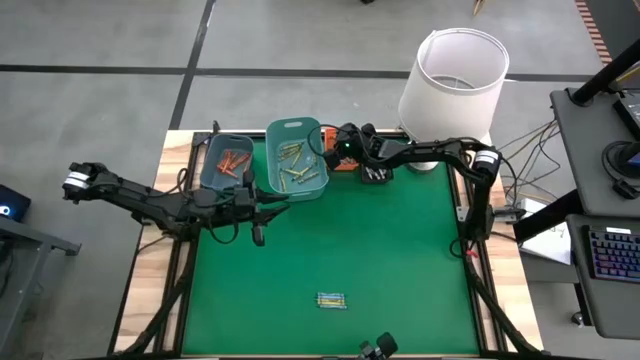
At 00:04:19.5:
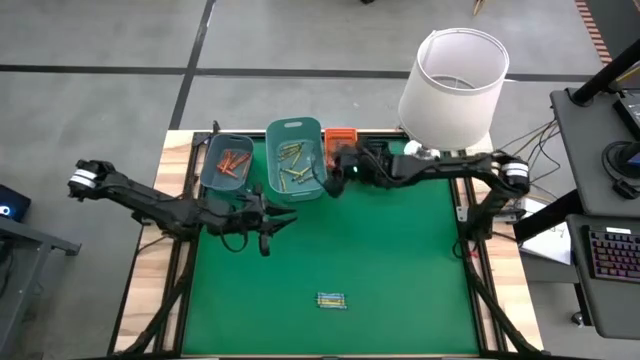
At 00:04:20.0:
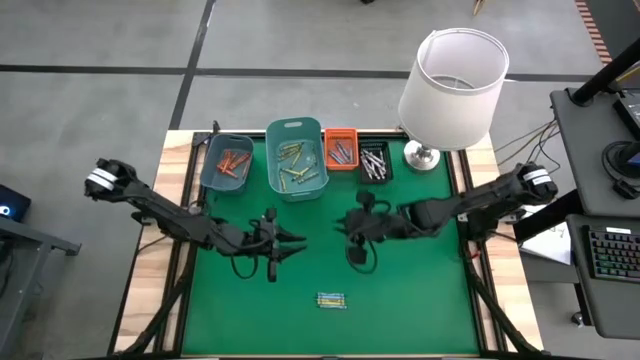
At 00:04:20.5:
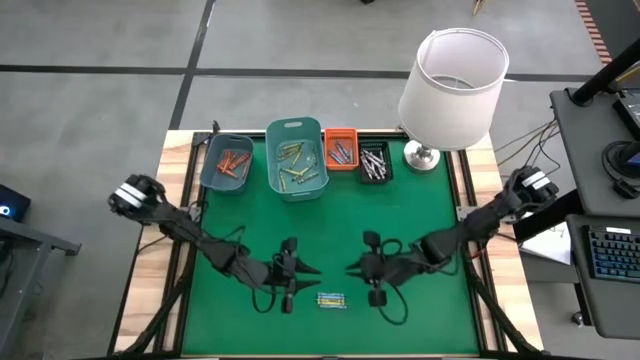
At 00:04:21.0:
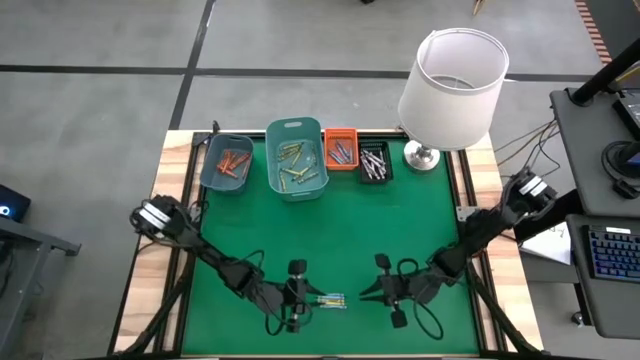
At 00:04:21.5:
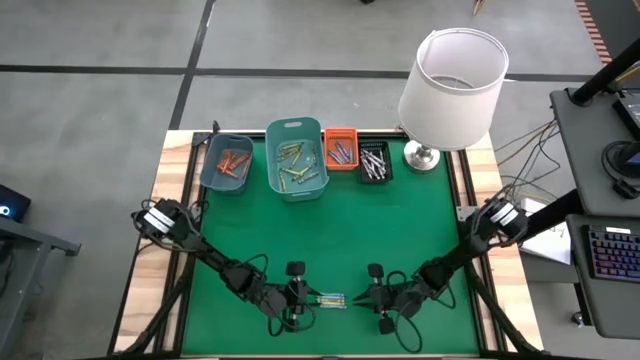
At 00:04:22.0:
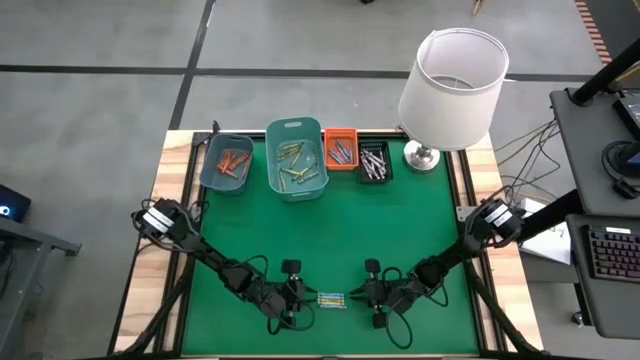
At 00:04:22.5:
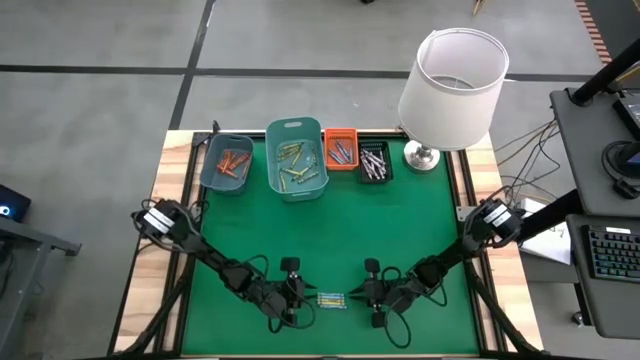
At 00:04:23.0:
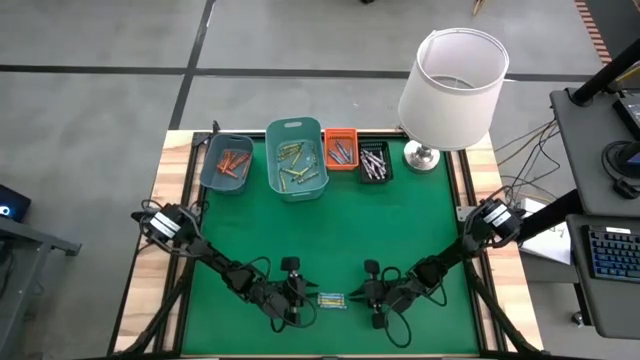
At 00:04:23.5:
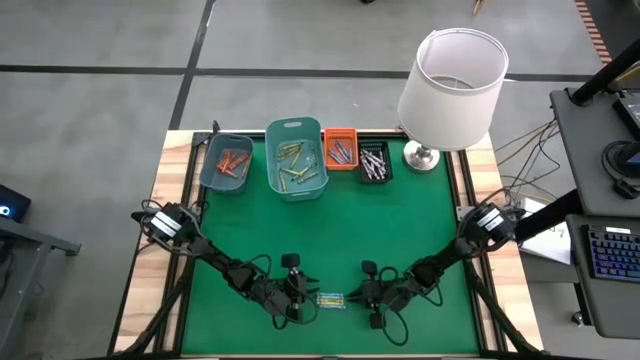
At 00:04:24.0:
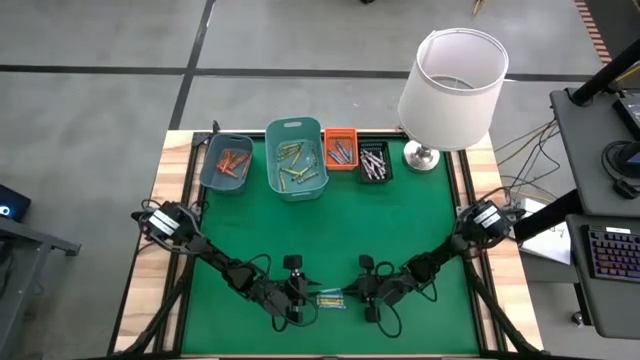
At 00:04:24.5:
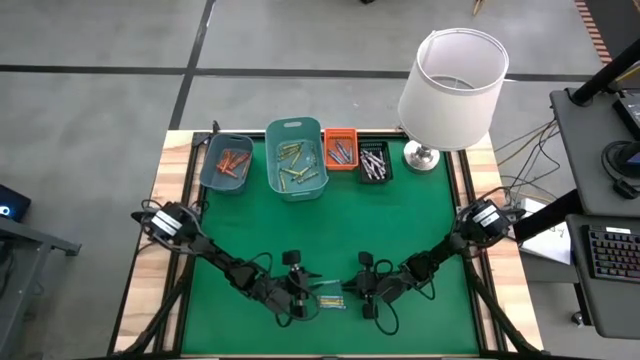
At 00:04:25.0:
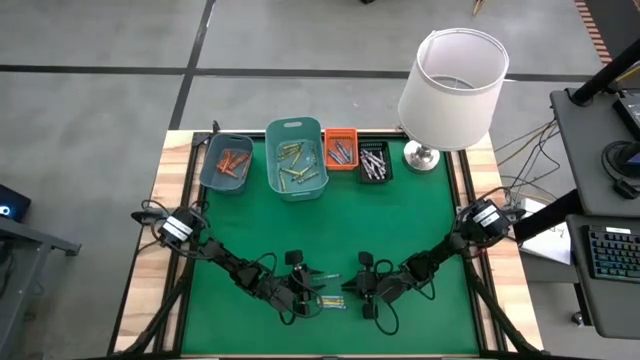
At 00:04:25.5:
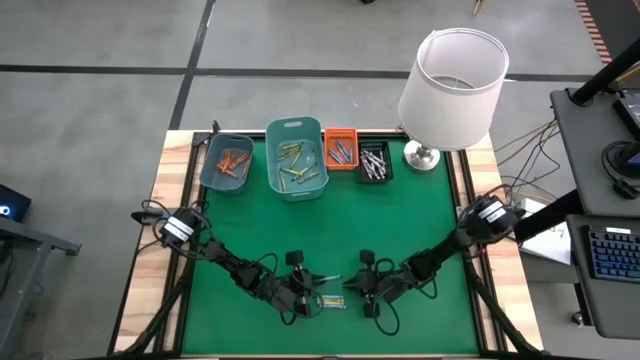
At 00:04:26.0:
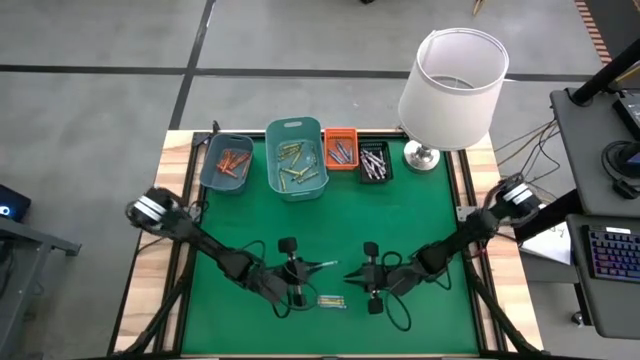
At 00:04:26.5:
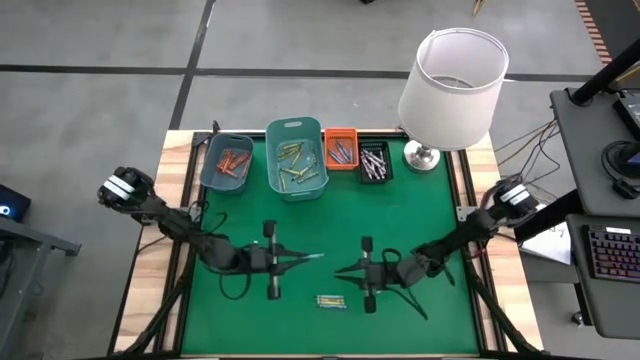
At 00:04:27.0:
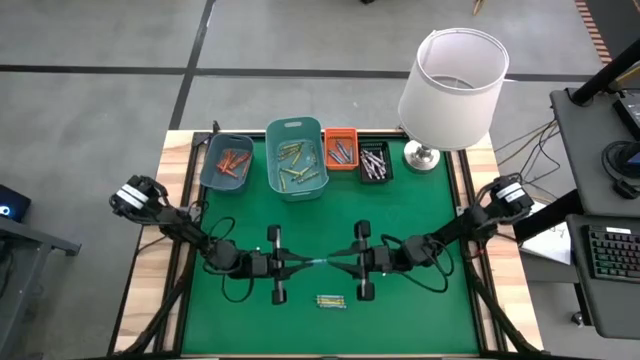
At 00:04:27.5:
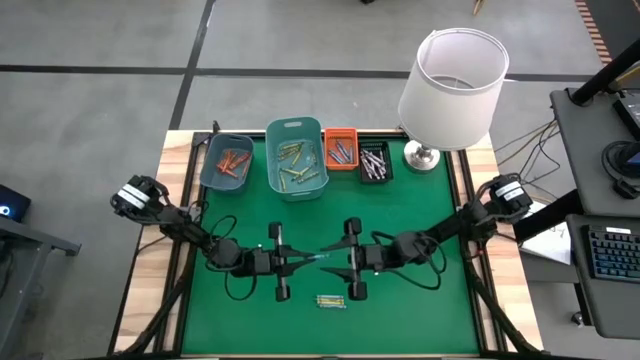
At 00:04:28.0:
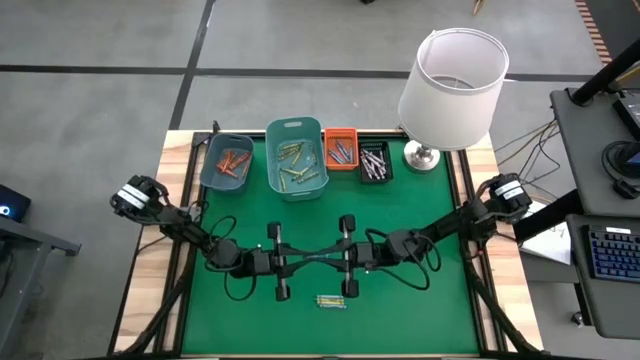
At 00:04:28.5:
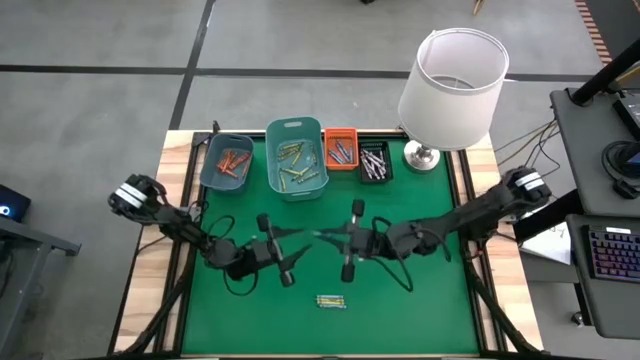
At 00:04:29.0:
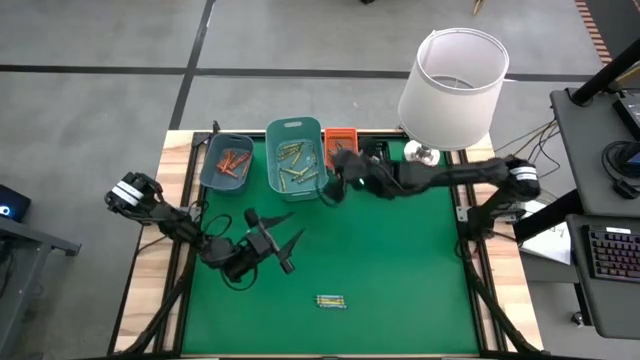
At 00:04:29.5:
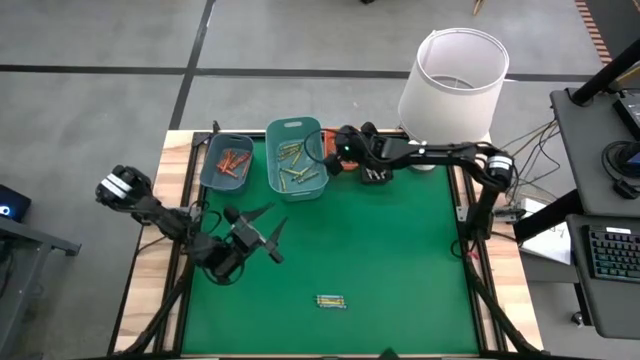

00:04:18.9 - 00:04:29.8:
Task: Sort crayons
Put the blue crayon into the orange bin

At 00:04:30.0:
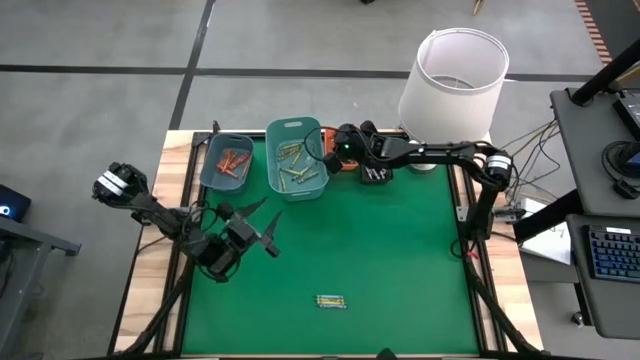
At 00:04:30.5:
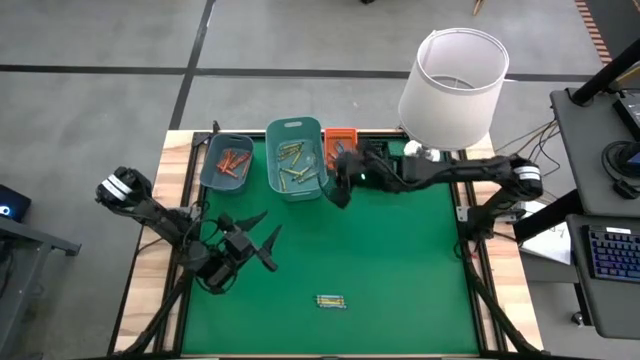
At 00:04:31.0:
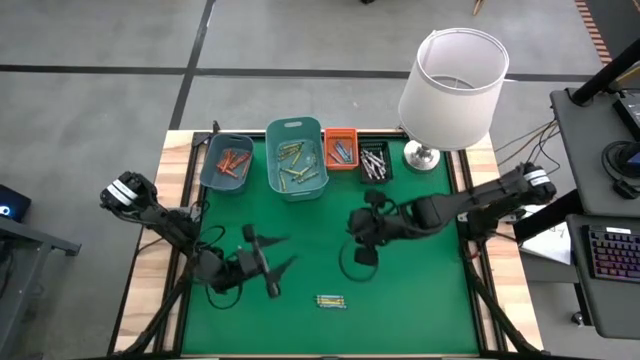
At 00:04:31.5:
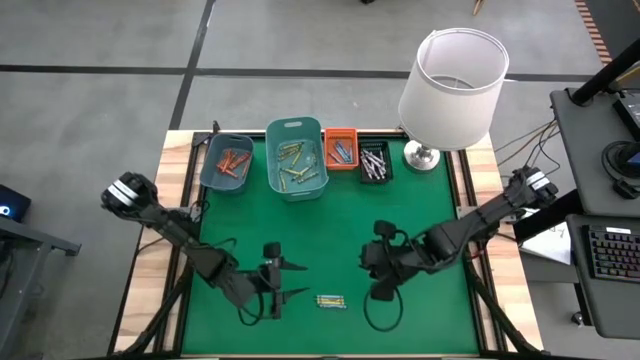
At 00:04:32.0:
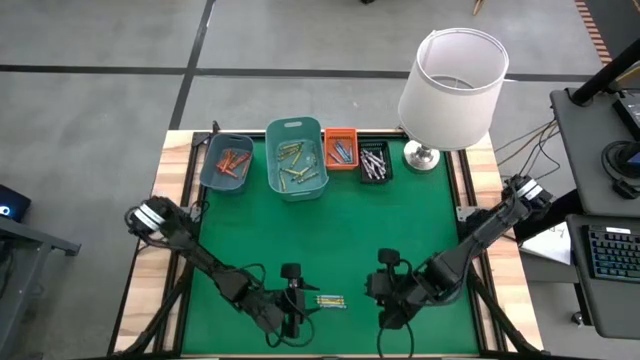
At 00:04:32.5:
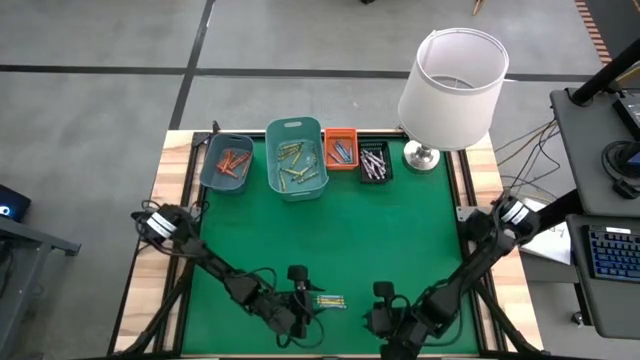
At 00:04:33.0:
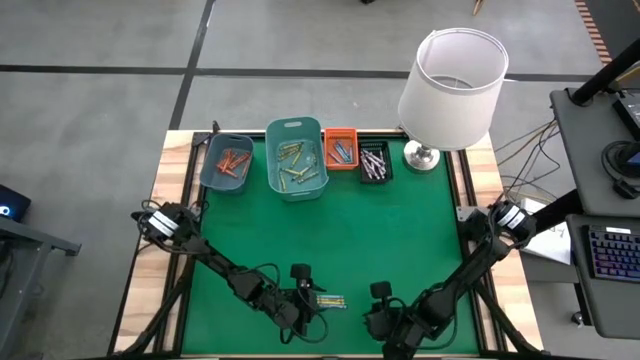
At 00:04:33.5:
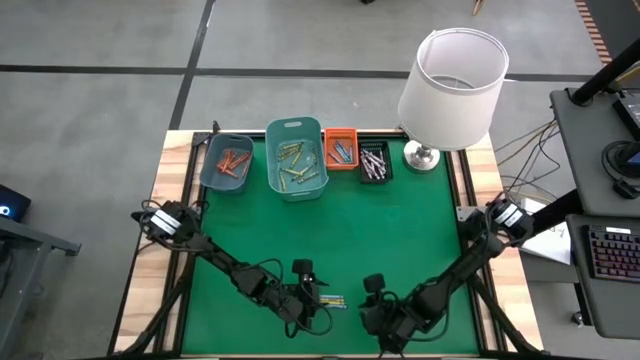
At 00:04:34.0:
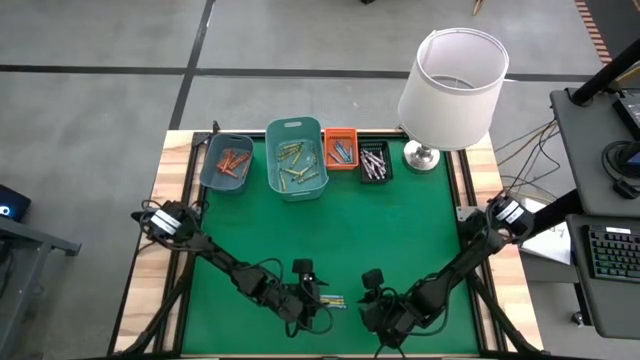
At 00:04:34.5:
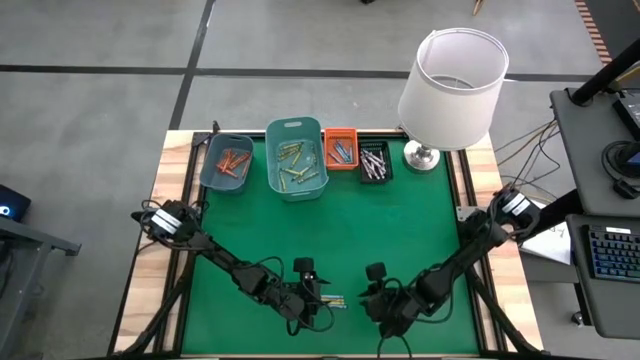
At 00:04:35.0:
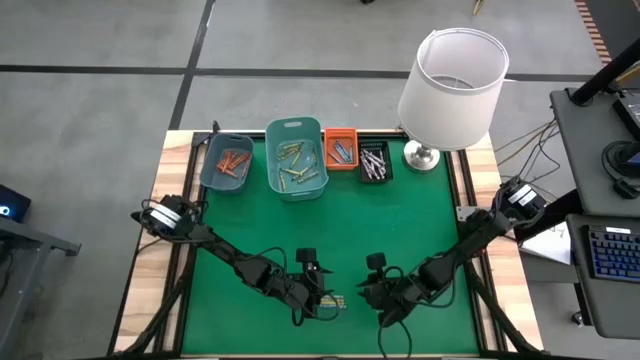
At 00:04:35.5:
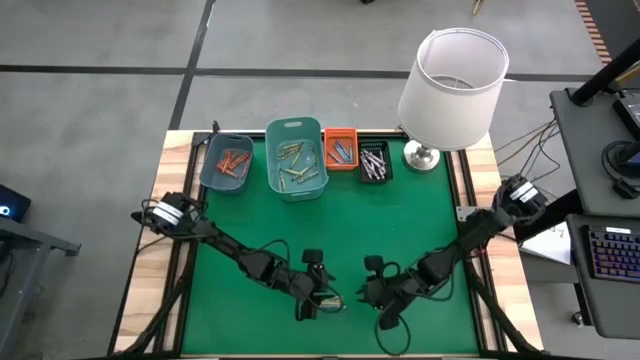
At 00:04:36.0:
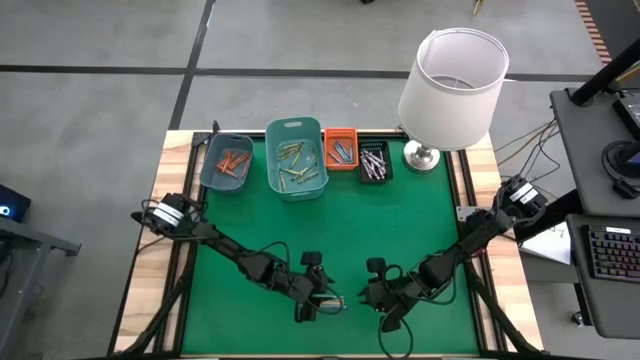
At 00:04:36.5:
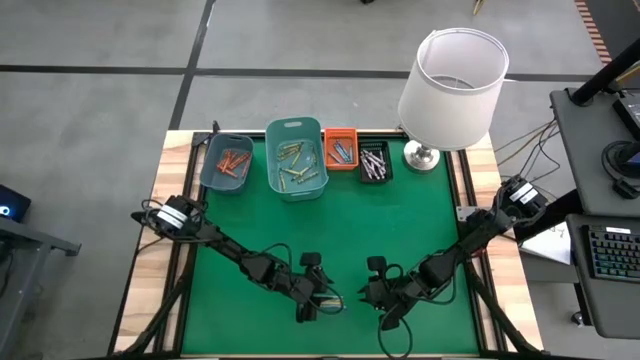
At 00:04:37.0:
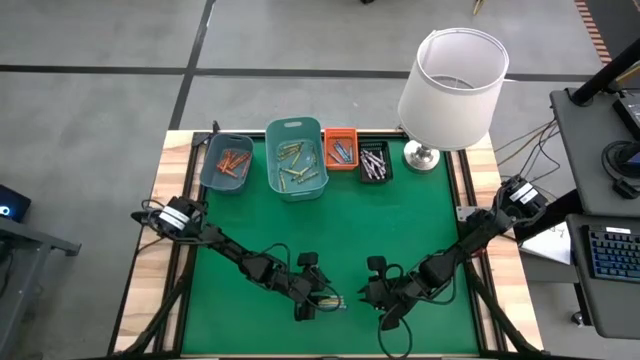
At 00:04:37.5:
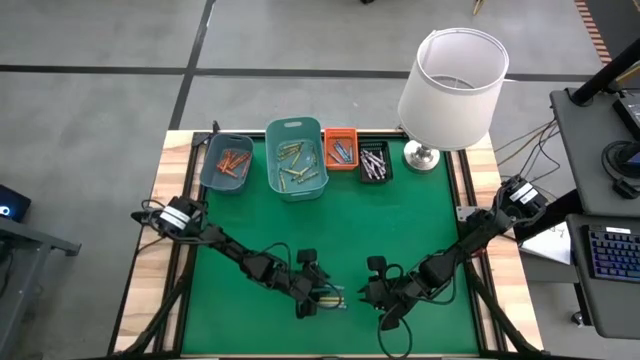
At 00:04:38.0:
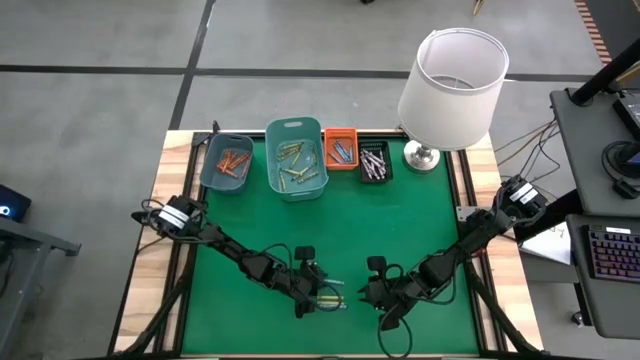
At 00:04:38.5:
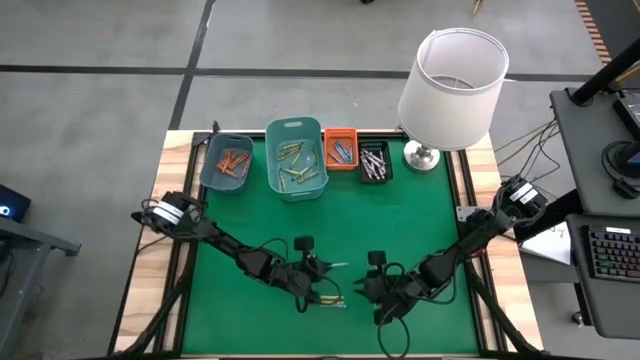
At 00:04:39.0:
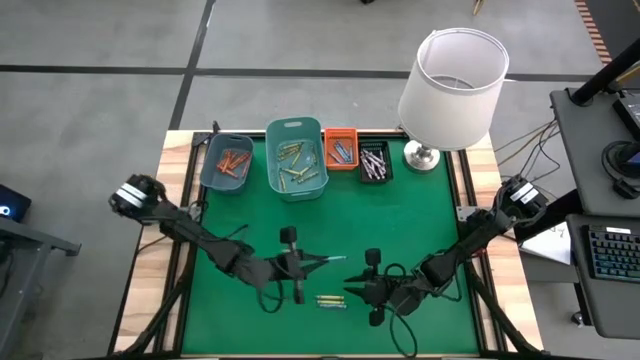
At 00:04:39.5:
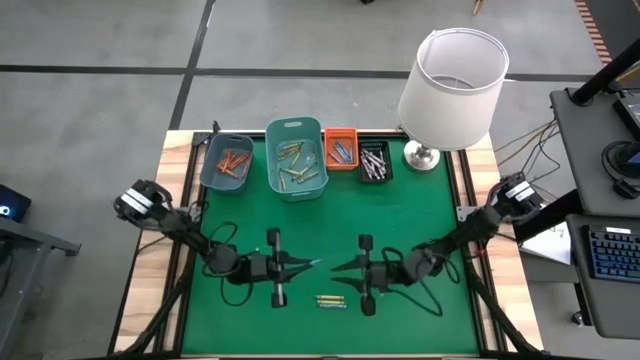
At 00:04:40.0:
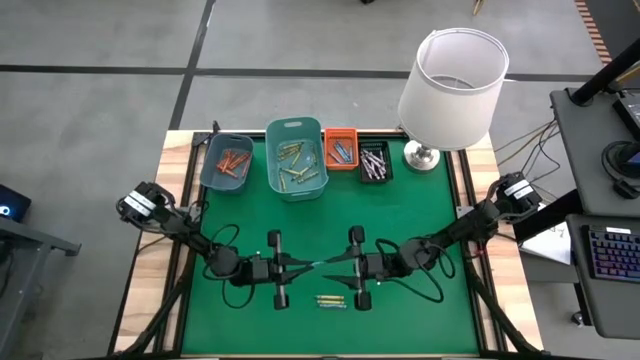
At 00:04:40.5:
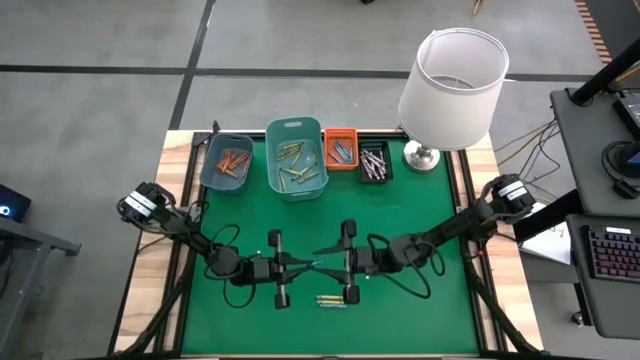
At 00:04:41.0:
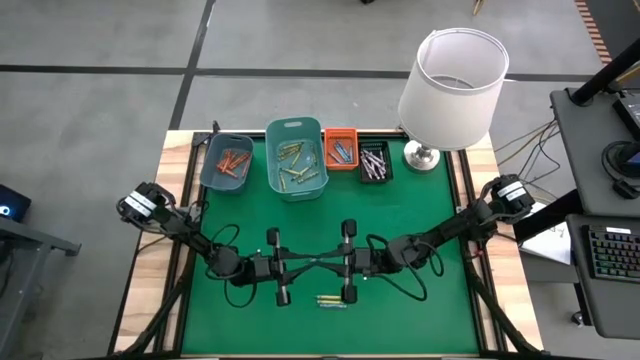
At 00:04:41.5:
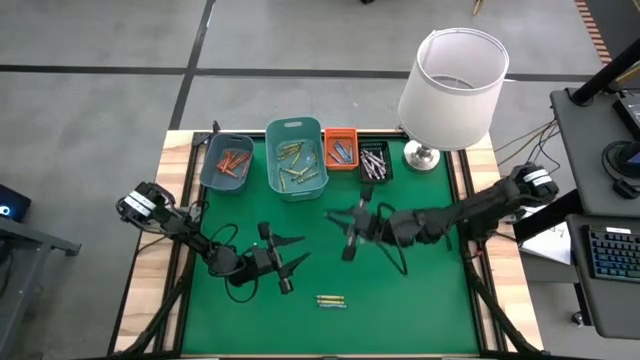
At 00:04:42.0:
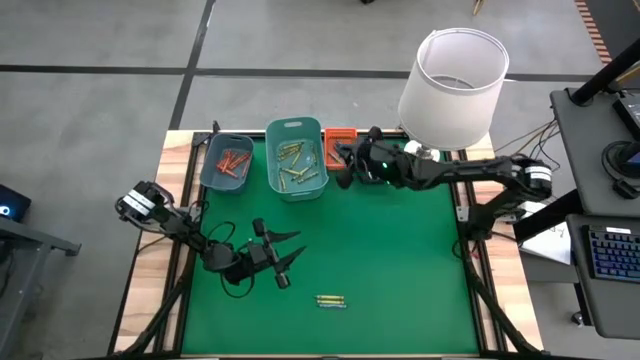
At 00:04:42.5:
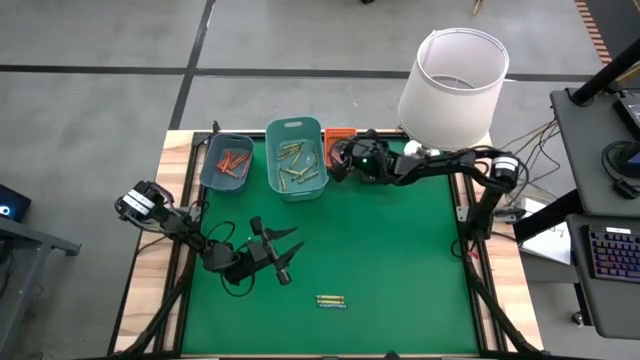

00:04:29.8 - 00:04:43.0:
Put the blue crayon into the orange bin
